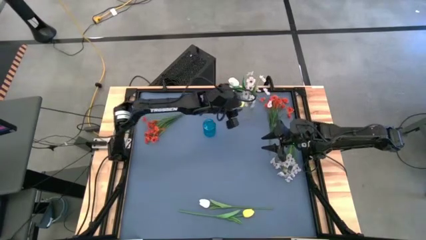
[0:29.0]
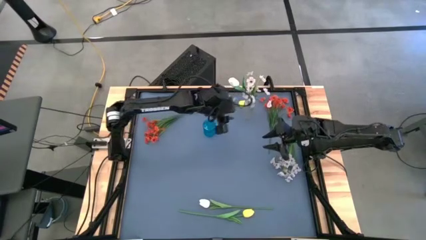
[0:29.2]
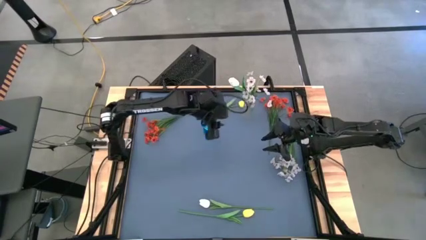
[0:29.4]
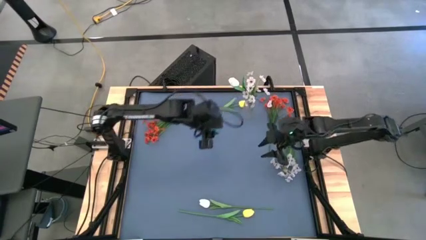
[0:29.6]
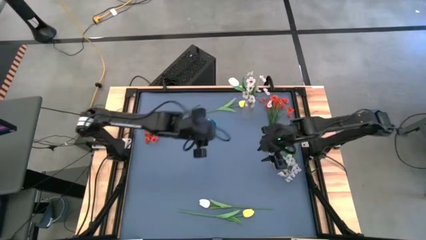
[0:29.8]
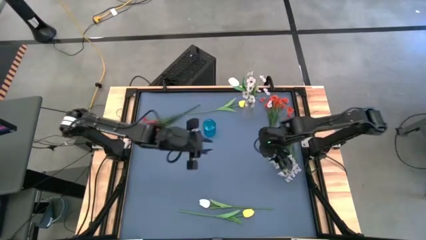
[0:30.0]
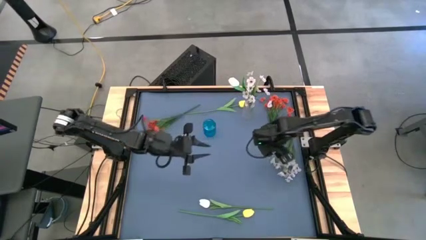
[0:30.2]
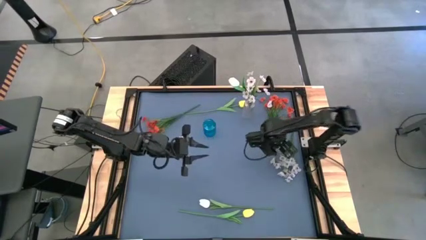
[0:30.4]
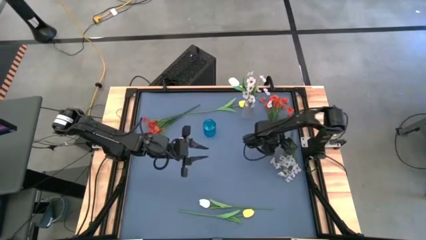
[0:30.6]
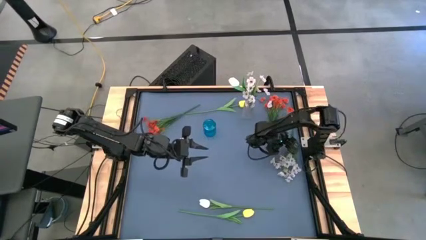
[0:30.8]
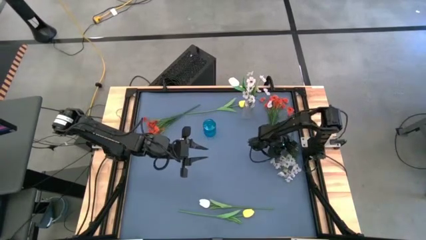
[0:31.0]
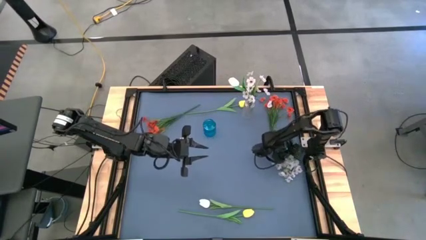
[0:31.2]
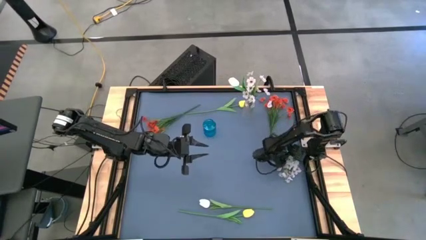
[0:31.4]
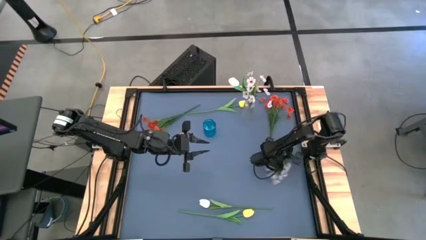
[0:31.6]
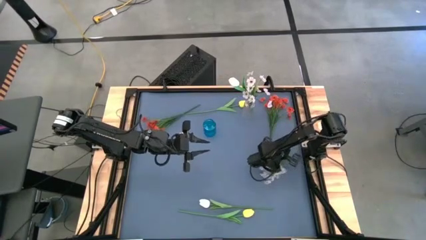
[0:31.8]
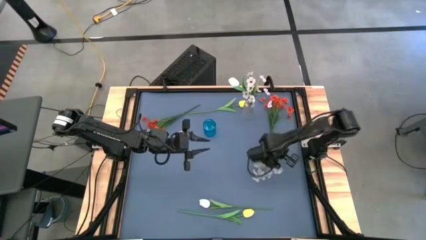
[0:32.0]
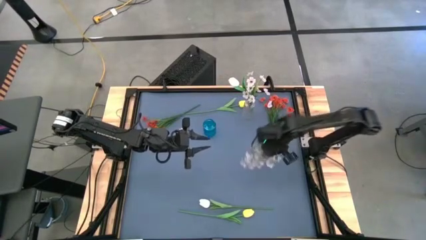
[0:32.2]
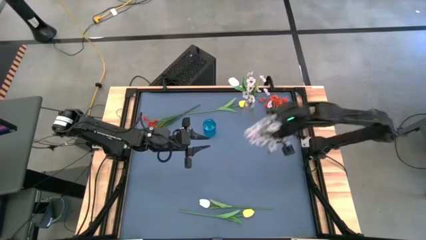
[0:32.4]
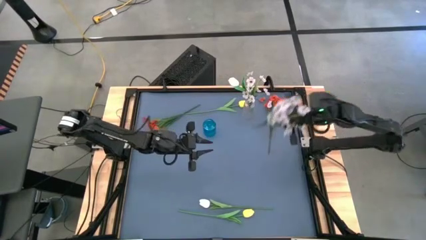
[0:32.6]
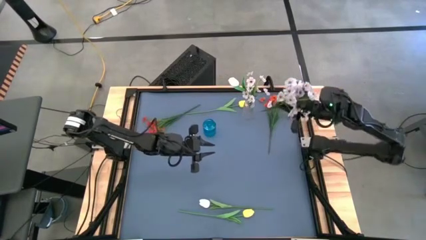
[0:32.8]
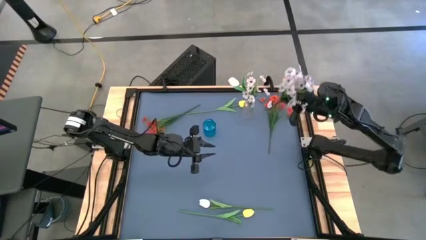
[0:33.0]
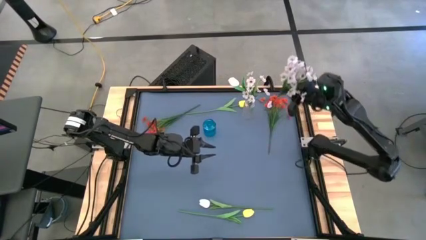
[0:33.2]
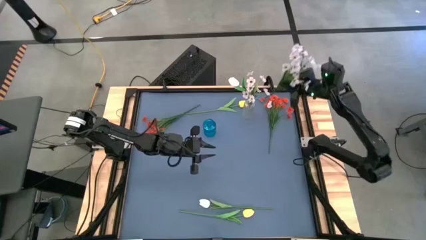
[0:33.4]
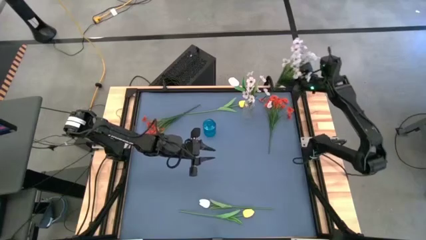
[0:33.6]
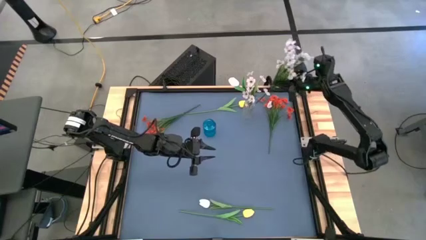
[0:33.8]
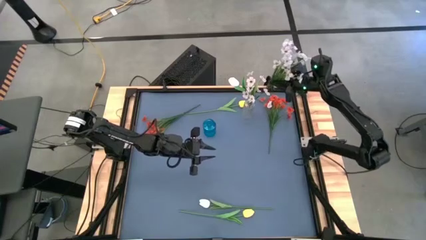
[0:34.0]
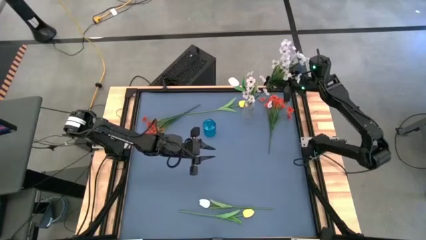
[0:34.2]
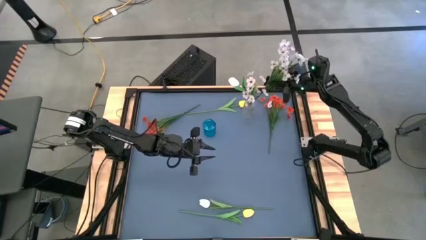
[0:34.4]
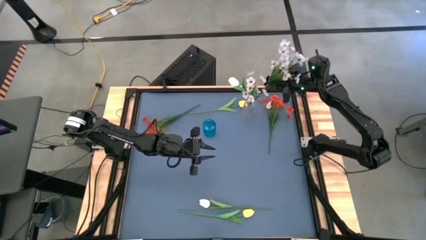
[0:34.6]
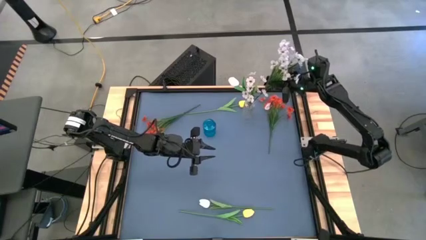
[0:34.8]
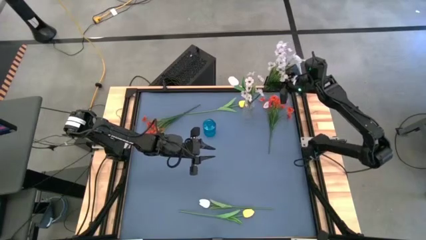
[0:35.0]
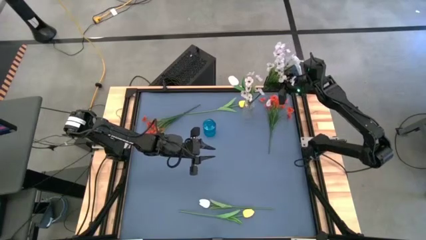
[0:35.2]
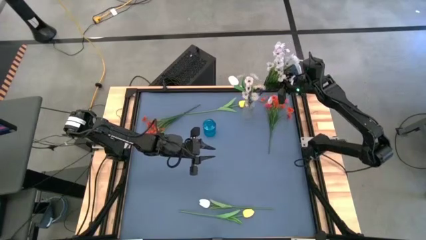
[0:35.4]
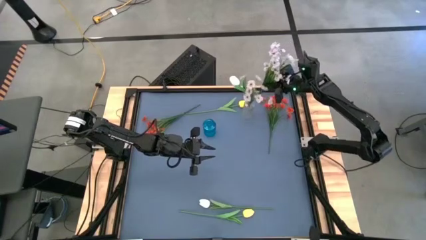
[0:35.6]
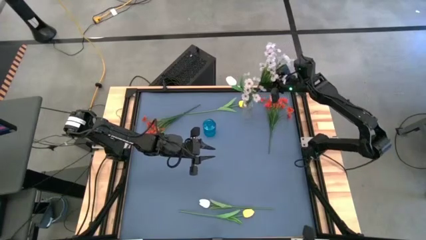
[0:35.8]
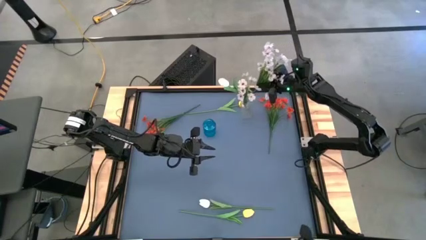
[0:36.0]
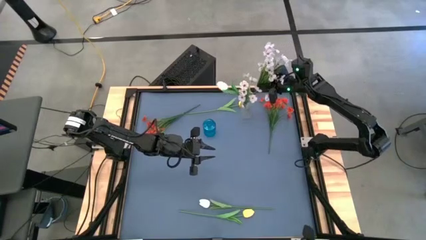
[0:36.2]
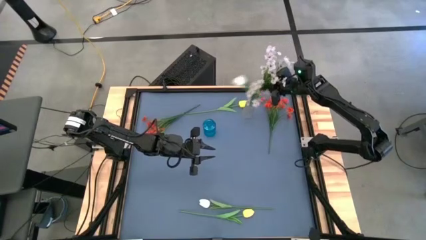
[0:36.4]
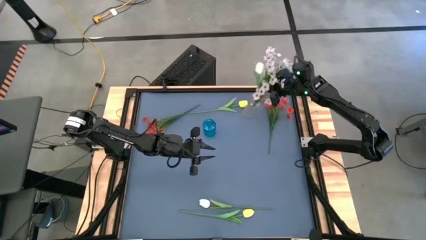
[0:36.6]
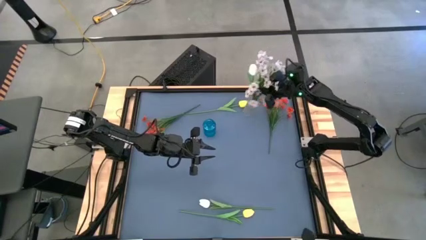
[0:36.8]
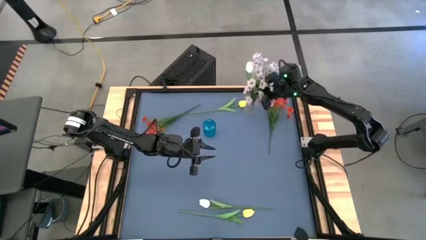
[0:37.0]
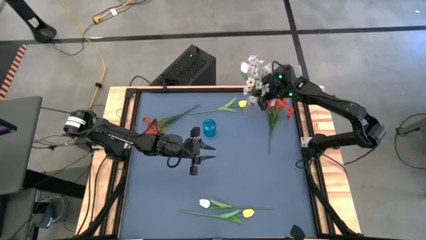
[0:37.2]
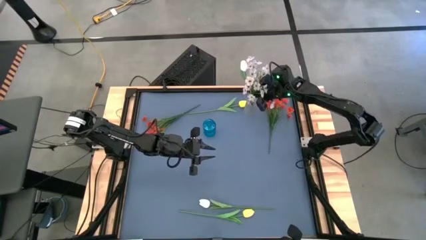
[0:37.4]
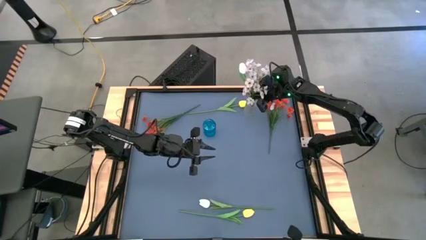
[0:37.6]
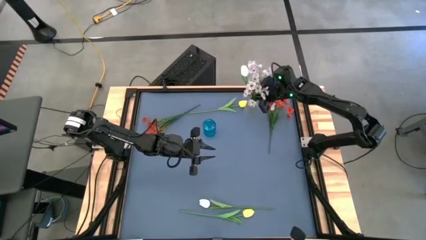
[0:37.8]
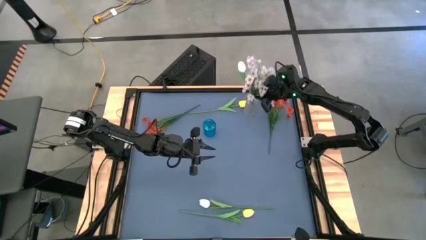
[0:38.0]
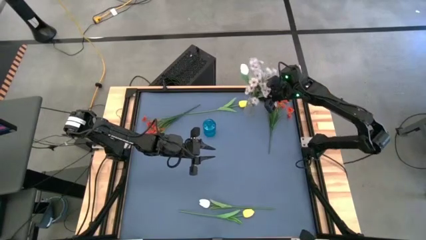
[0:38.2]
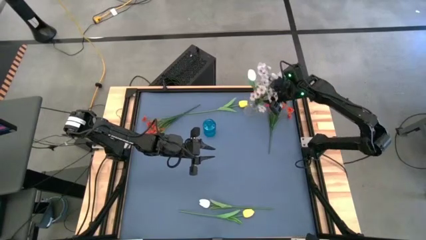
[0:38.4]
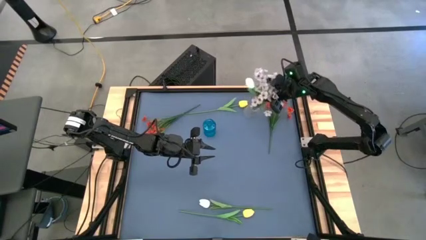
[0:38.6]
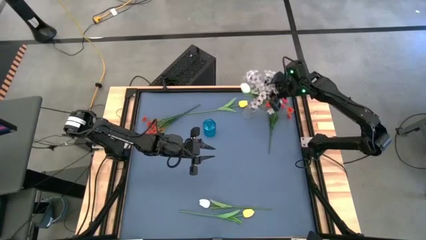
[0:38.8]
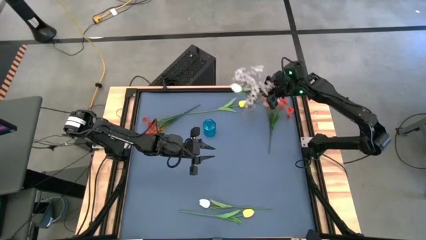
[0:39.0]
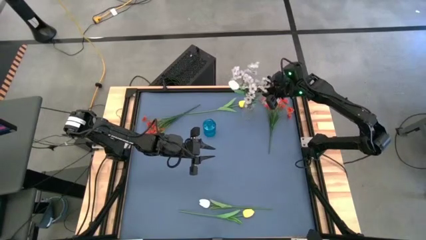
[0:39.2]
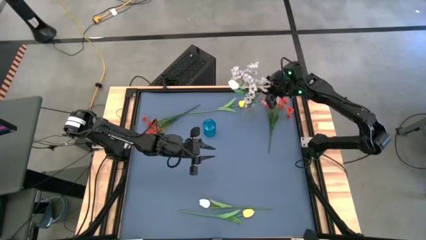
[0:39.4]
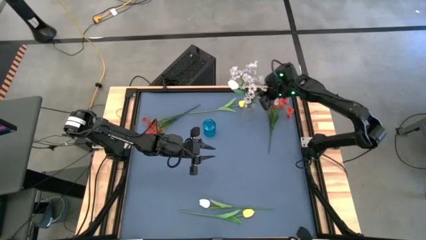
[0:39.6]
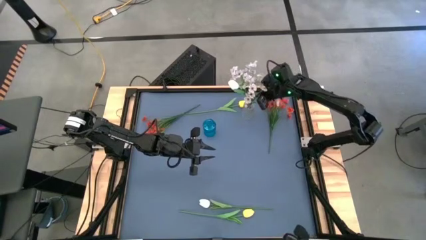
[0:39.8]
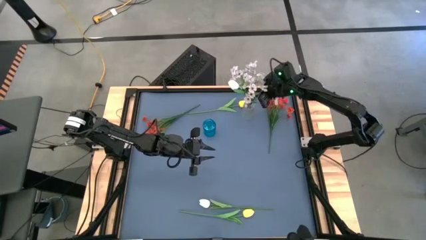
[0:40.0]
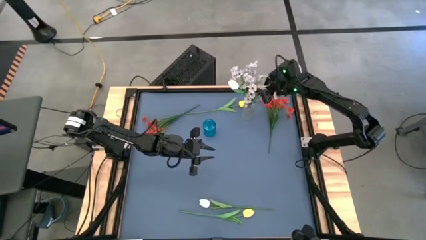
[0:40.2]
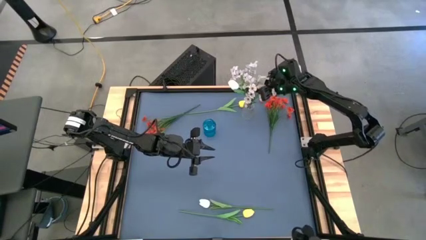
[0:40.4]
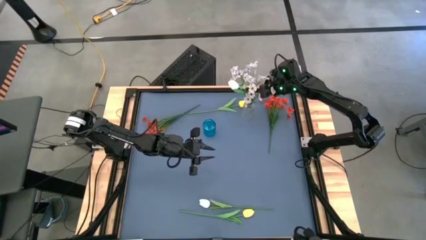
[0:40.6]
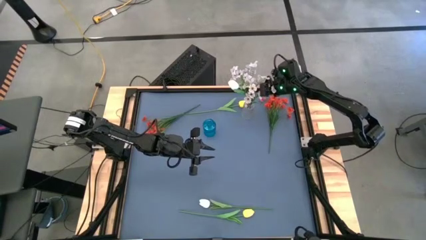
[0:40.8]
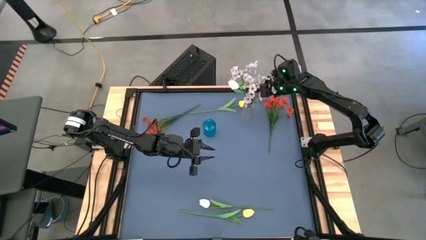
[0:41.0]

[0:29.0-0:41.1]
Task: Sort flowers into vase by color
Put the white flowers into the transparent vase
